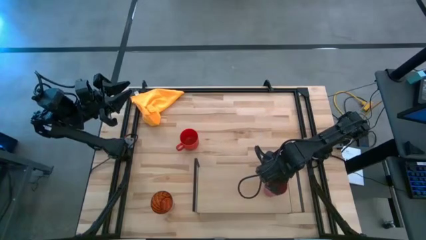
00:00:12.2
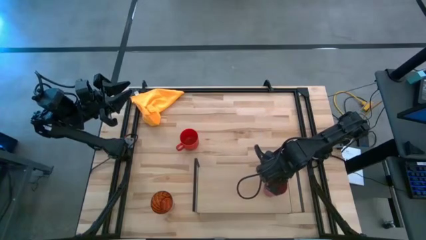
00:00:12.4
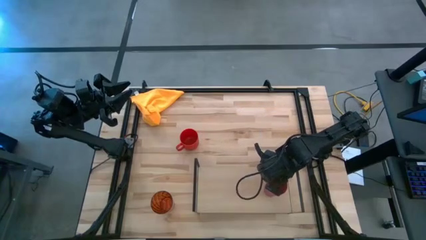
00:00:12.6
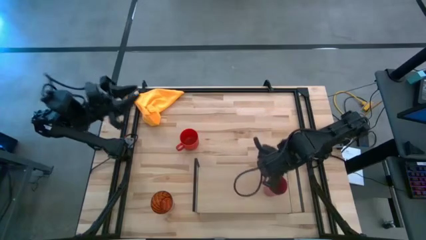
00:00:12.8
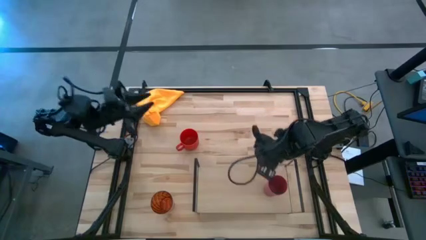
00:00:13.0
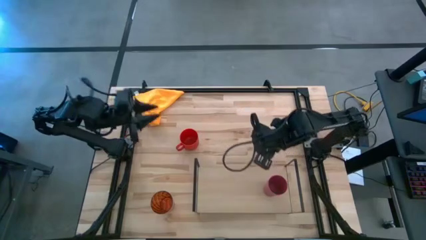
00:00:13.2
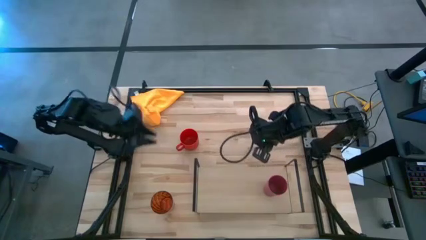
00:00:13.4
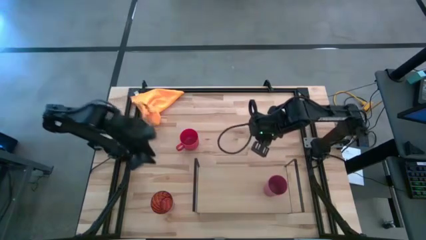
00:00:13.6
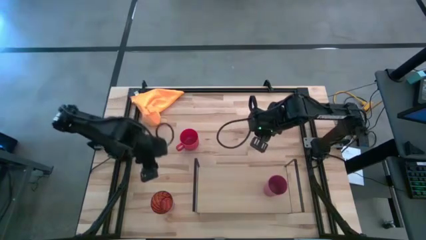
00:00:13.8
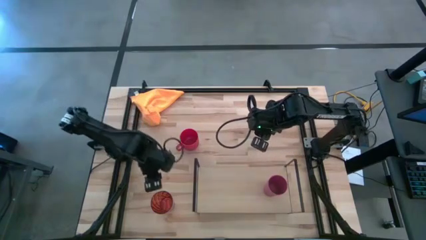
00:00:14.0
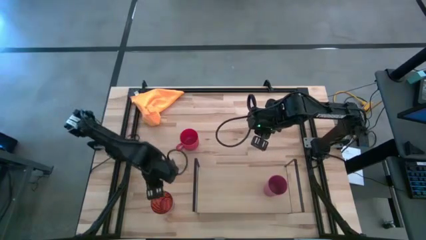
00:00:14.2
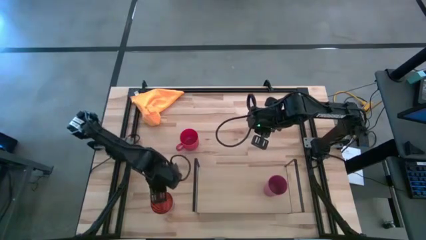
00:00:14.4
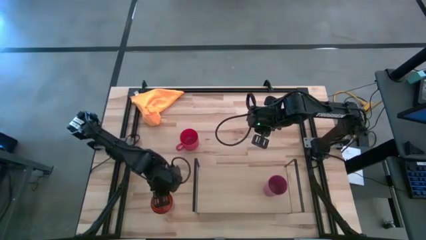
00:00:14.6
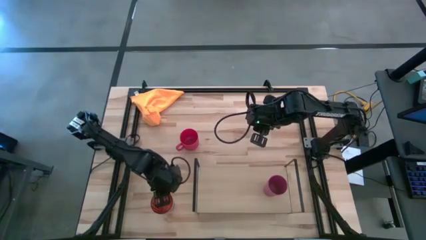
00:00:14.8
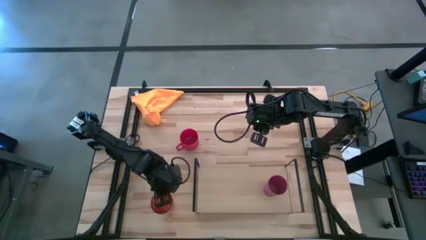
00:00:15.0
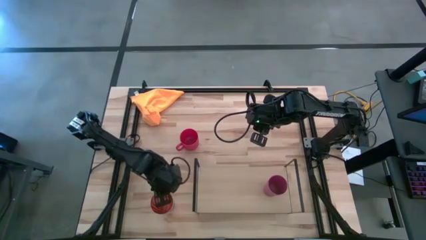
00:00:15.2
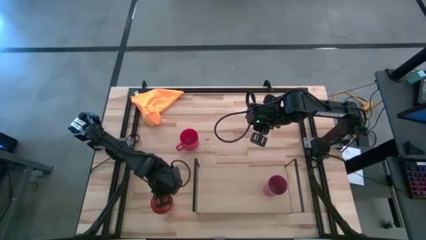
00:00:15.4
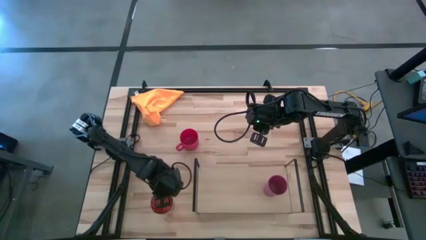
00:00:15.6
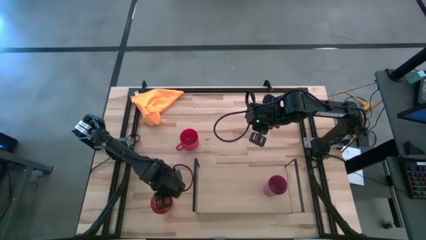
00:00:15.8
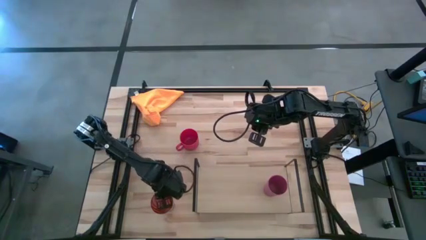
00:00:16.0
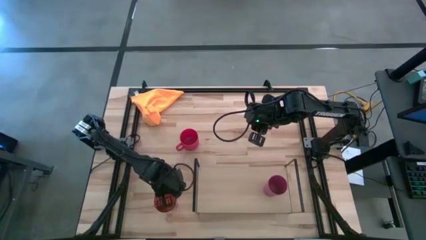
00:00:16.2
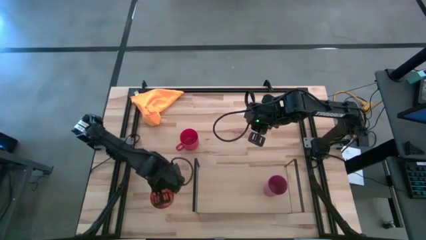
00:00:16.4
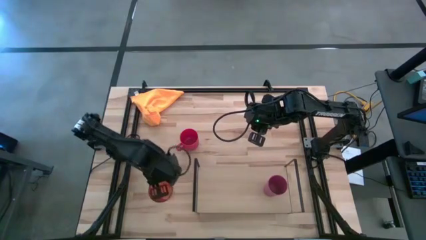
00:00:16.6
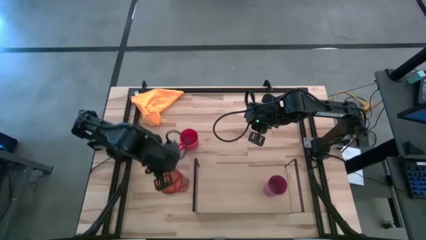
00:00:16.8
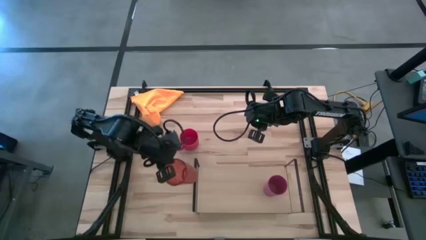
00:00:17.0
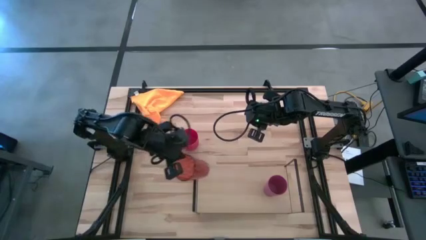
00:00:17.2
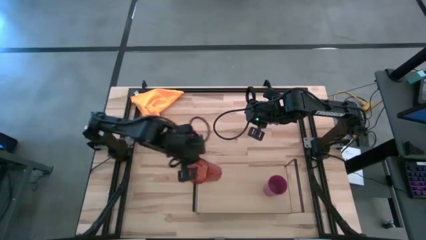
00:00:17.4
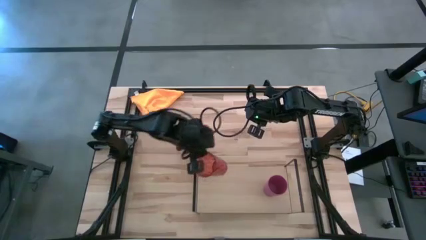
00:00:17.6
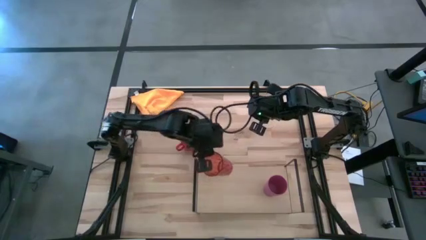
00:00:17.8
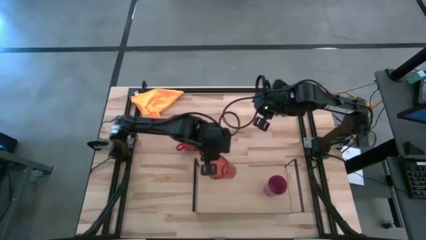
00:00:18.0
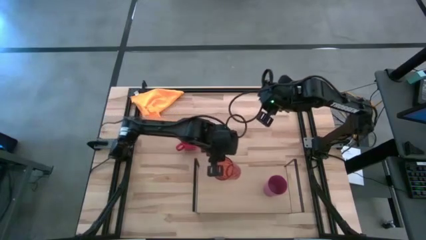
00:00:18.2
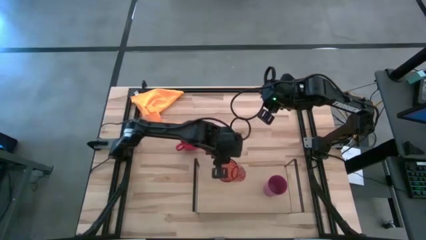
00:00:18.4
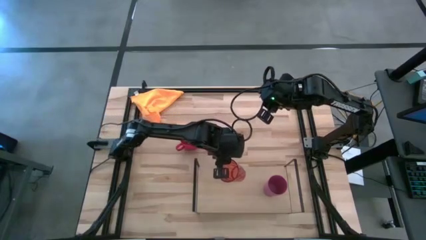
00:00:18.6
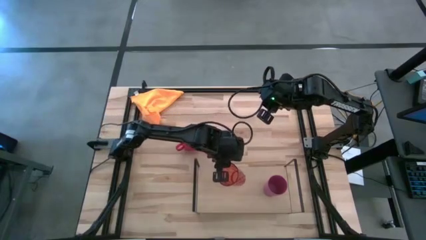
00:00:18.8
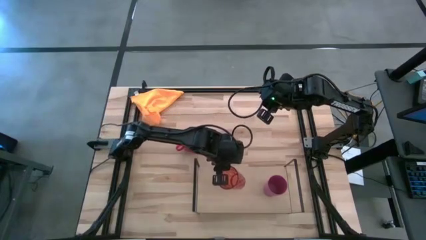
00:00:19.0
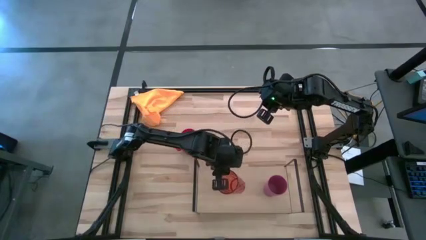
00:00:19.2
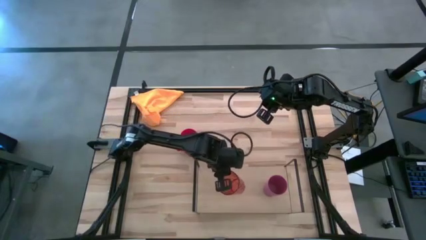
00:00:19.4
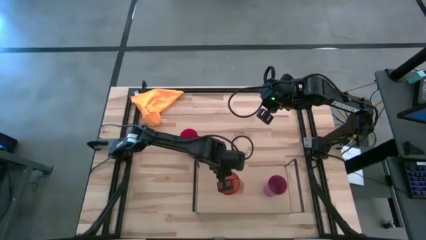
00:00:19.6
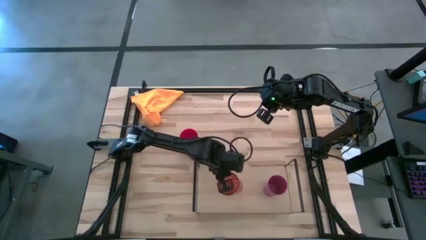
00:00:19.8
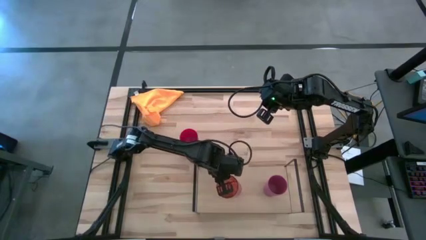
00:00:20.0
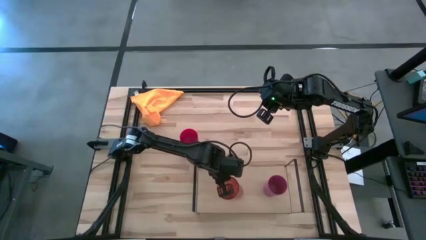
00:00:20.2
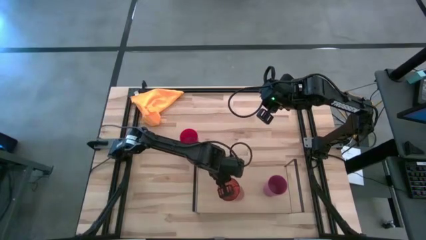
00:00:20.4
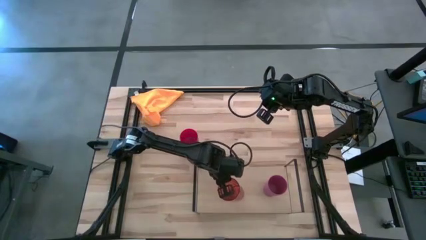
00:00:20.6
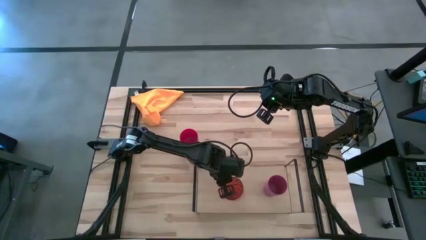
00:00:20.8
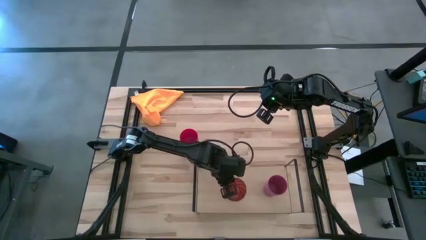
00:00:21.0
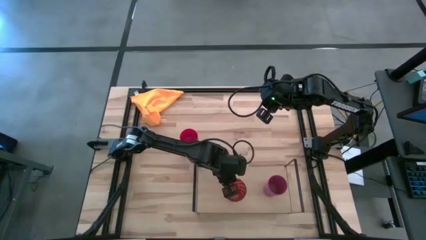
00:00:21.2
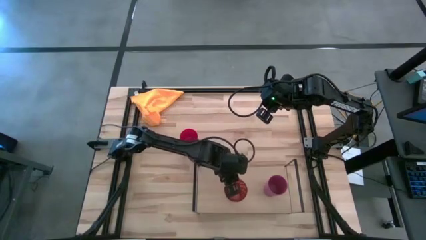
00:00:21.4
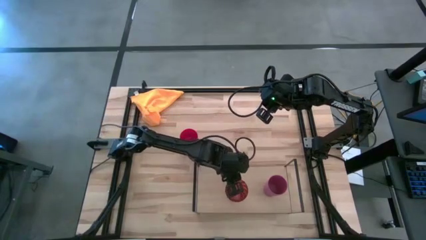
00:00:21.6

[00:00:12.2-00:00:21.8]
Task: Stack small to large cups/mugs on shelf
Put the brown water glass on the shelf

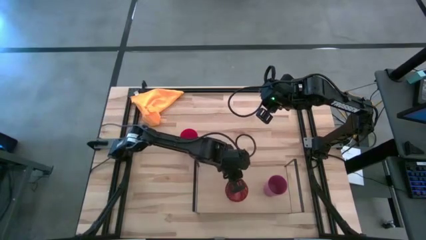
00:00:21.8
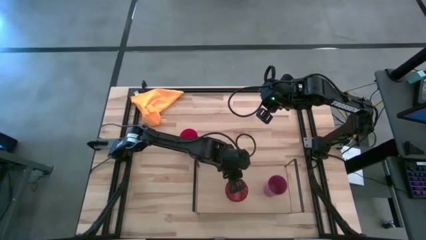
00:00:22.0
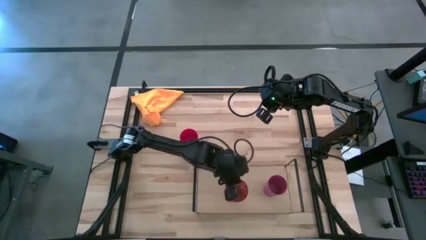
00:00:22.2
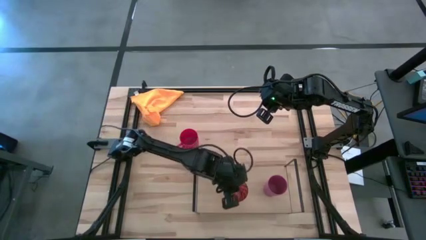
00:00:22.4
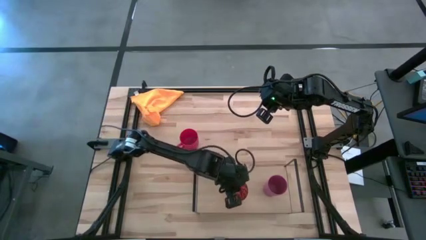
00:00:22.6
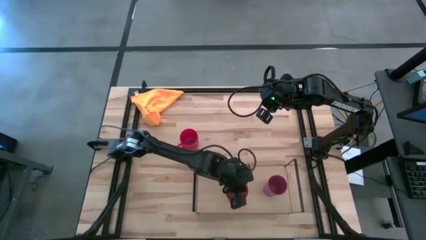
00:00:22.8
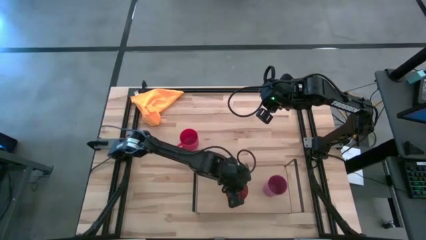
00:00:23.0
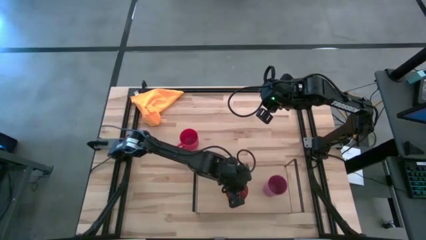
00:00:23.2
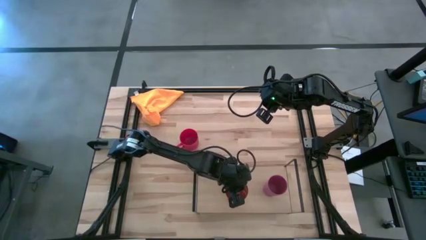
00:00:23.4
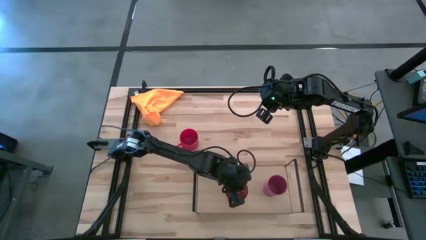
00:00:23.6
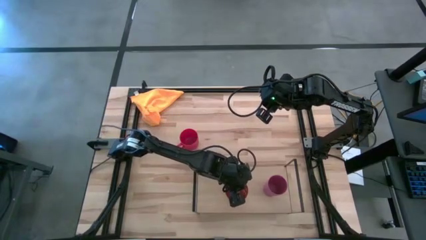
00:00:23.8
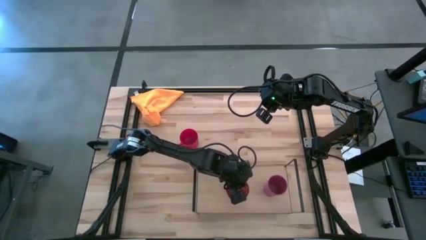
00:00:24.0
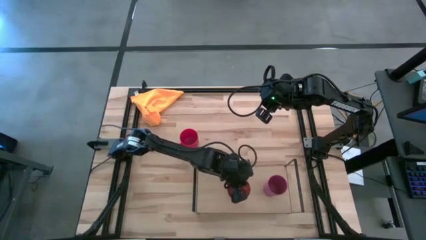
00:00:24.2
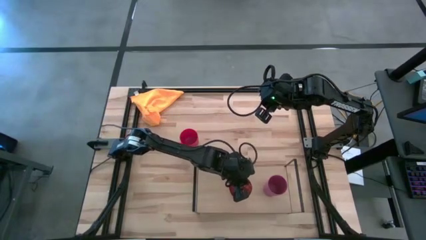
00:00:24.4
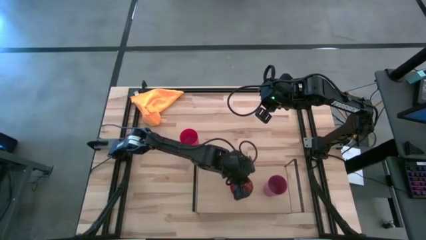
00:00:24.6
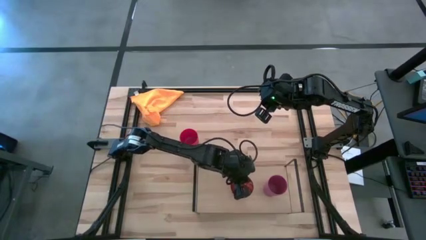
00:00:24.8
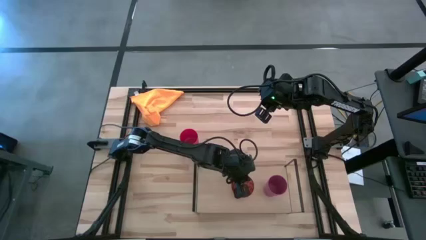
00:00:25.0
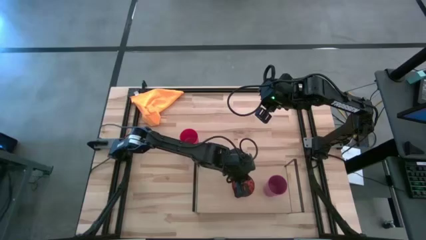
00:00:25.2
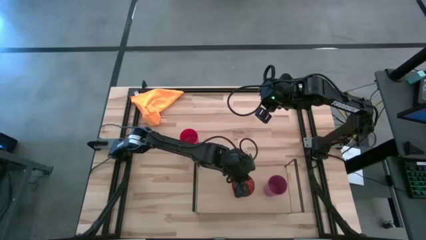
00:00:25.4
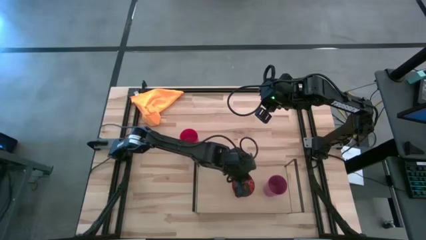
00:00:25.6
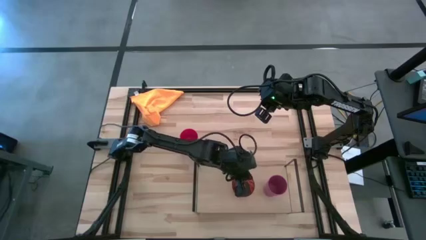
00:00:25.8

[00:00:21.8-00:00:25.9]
Adjust the brown water glass on the shelf
